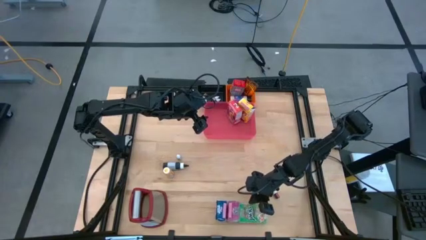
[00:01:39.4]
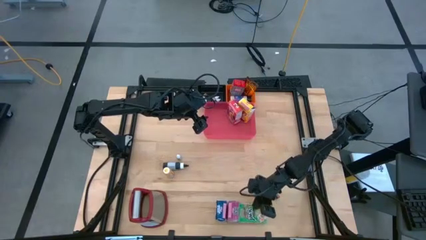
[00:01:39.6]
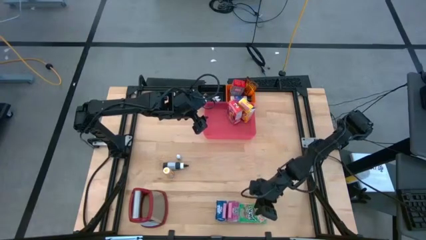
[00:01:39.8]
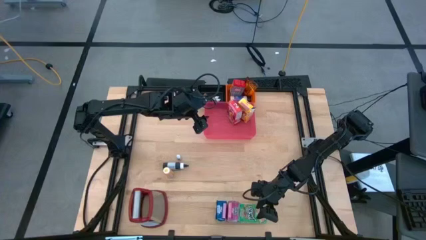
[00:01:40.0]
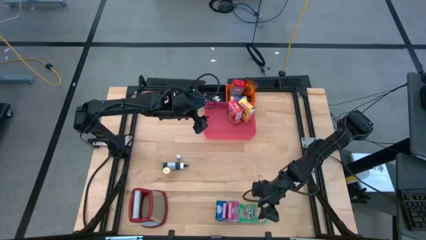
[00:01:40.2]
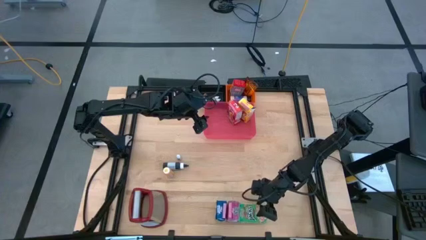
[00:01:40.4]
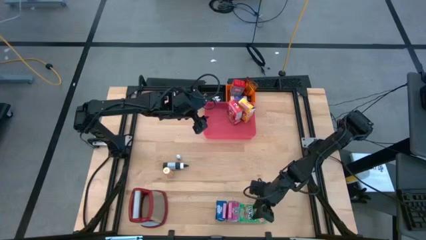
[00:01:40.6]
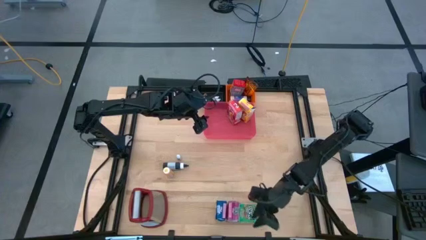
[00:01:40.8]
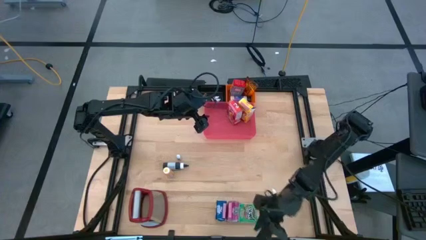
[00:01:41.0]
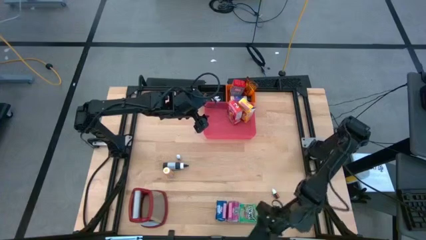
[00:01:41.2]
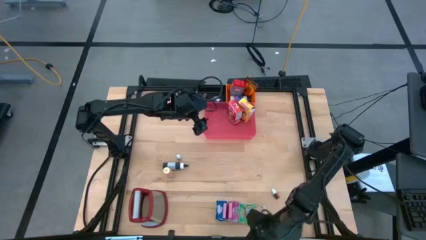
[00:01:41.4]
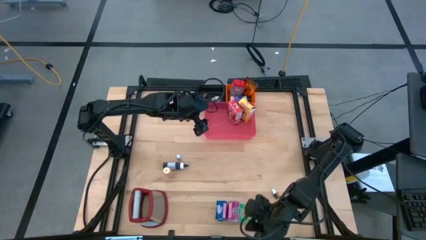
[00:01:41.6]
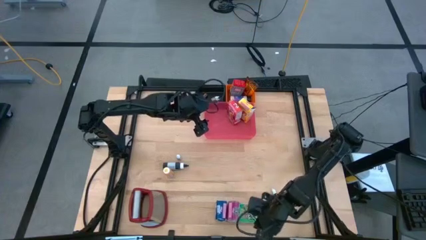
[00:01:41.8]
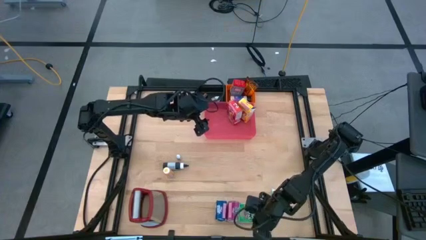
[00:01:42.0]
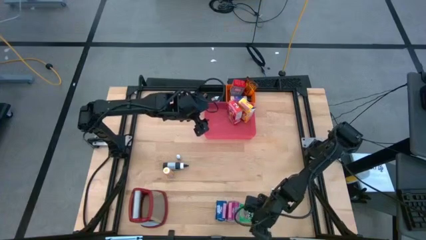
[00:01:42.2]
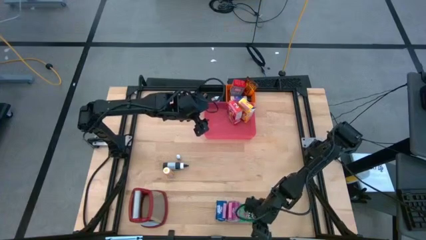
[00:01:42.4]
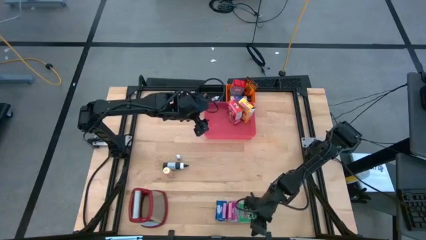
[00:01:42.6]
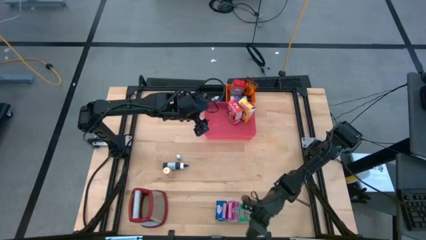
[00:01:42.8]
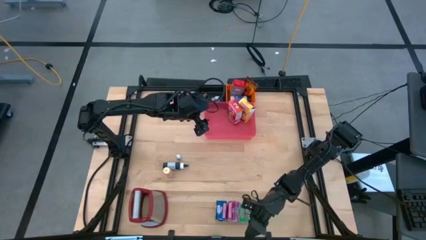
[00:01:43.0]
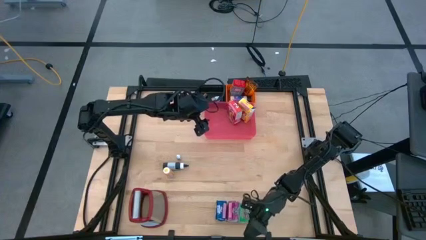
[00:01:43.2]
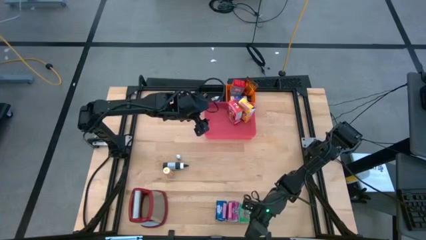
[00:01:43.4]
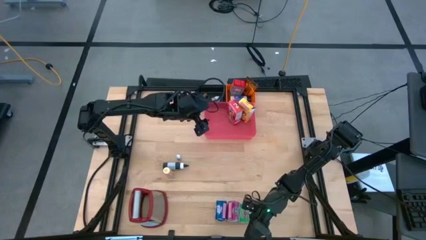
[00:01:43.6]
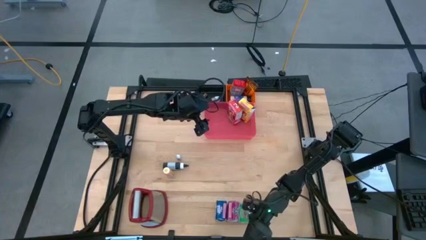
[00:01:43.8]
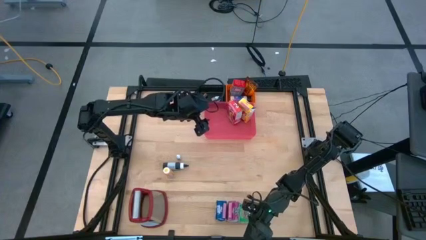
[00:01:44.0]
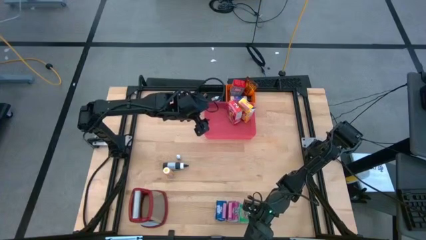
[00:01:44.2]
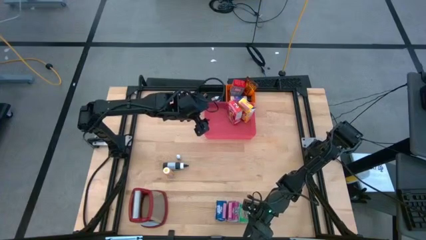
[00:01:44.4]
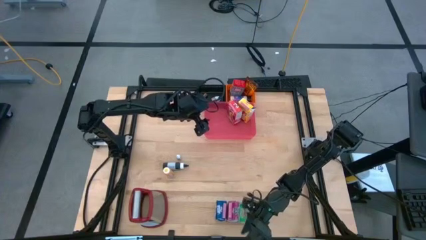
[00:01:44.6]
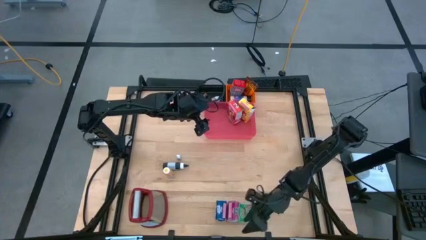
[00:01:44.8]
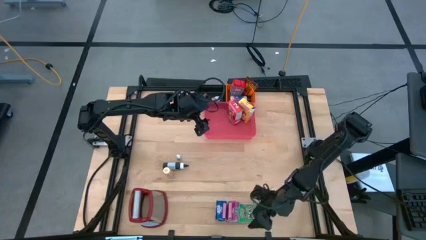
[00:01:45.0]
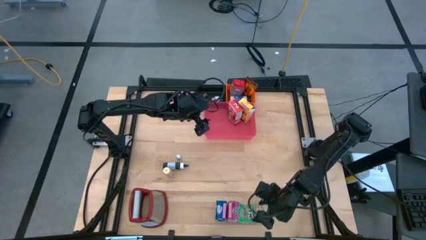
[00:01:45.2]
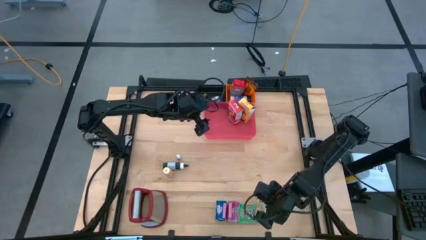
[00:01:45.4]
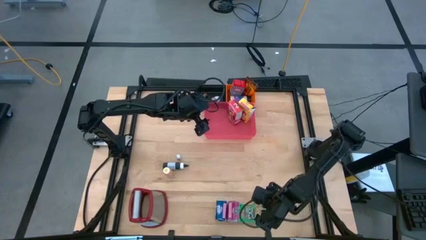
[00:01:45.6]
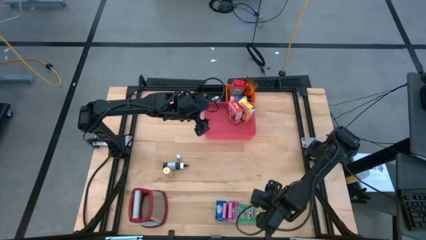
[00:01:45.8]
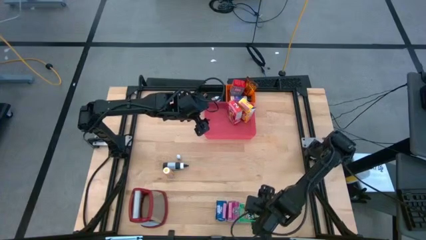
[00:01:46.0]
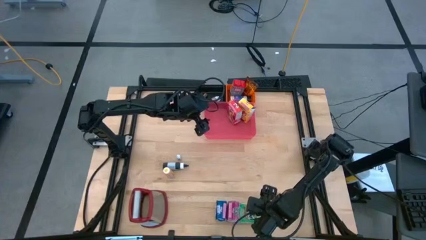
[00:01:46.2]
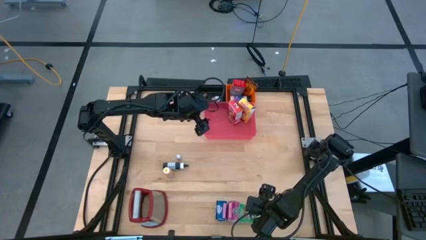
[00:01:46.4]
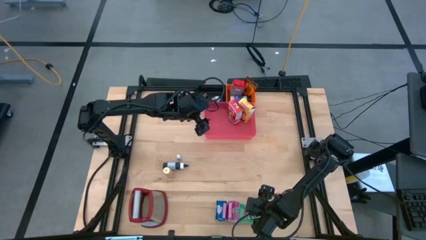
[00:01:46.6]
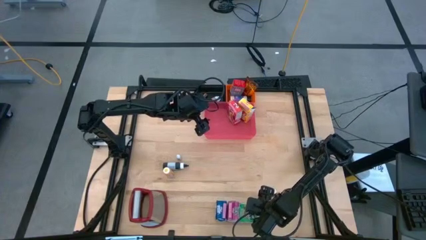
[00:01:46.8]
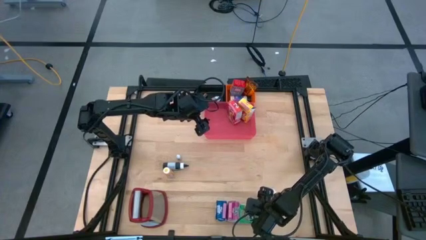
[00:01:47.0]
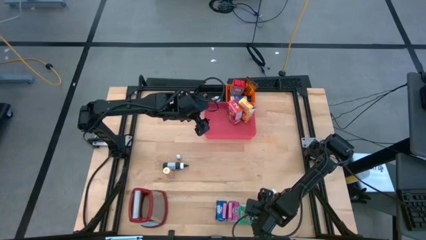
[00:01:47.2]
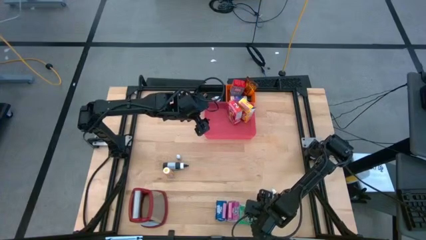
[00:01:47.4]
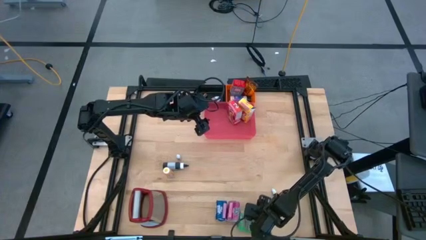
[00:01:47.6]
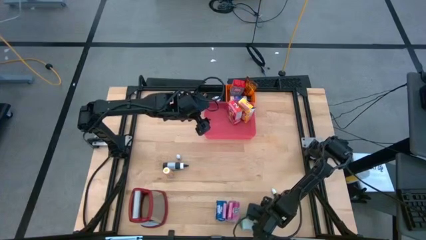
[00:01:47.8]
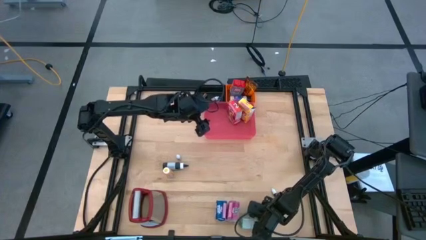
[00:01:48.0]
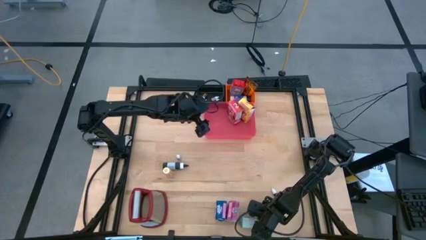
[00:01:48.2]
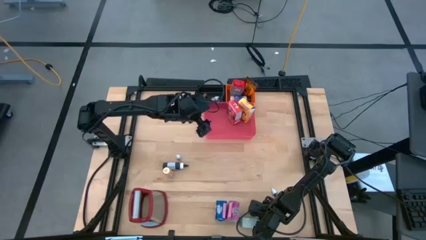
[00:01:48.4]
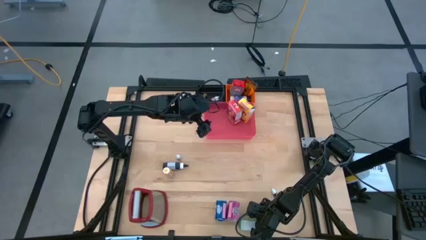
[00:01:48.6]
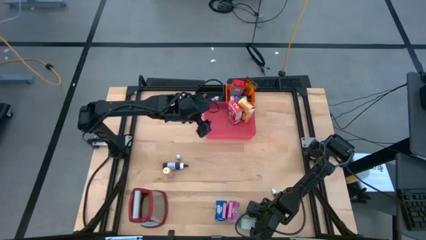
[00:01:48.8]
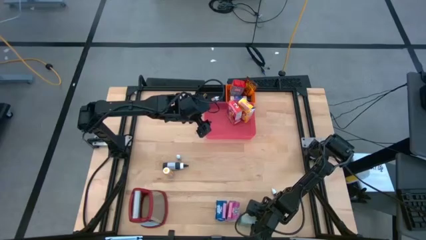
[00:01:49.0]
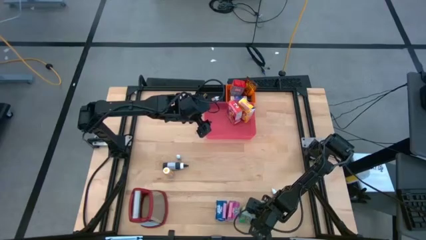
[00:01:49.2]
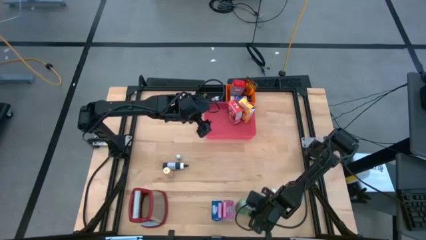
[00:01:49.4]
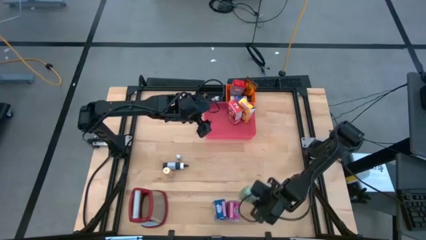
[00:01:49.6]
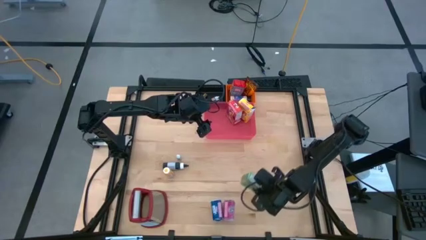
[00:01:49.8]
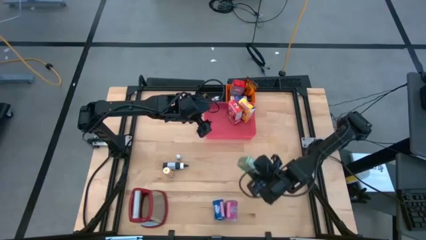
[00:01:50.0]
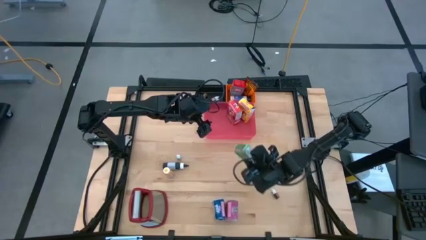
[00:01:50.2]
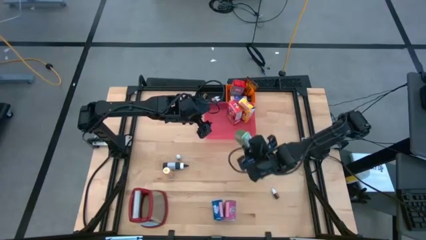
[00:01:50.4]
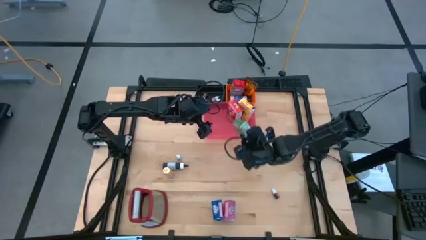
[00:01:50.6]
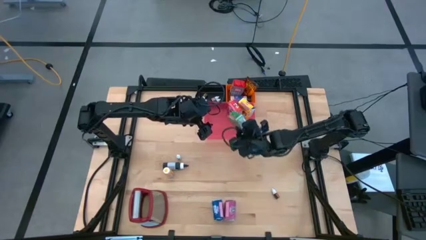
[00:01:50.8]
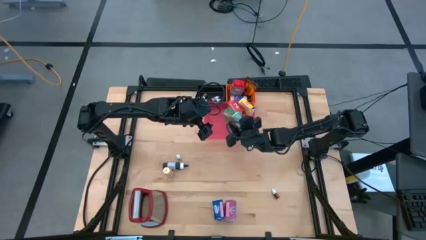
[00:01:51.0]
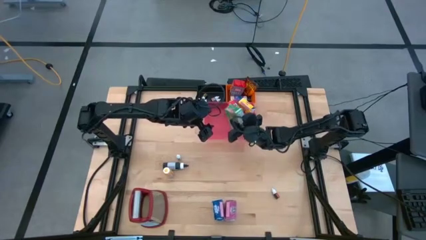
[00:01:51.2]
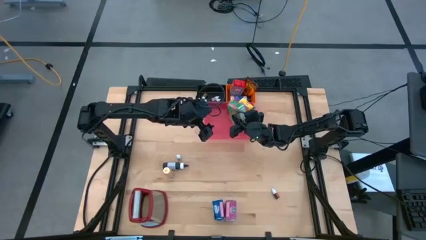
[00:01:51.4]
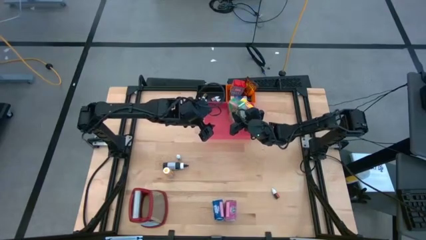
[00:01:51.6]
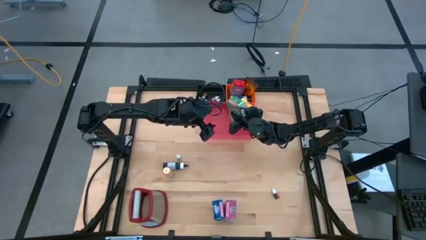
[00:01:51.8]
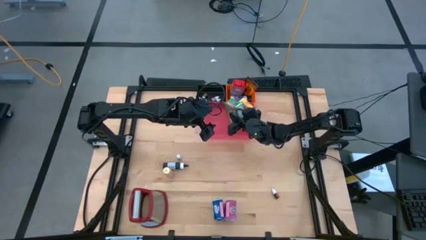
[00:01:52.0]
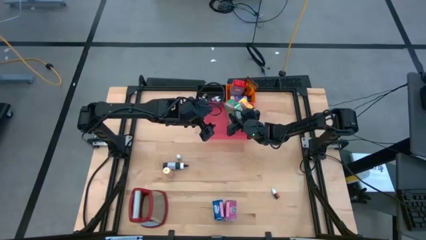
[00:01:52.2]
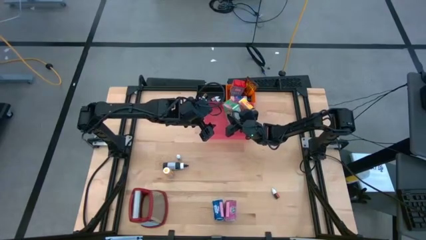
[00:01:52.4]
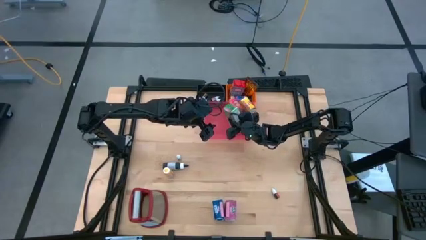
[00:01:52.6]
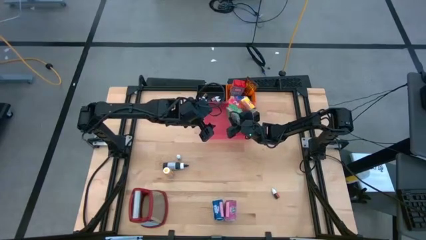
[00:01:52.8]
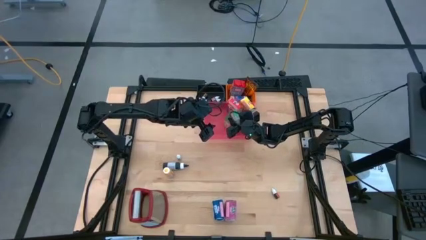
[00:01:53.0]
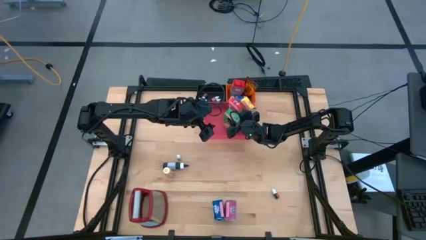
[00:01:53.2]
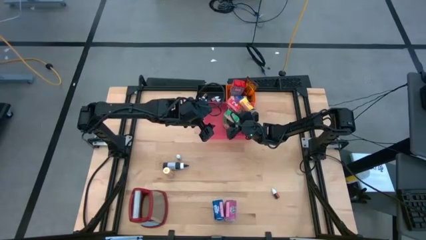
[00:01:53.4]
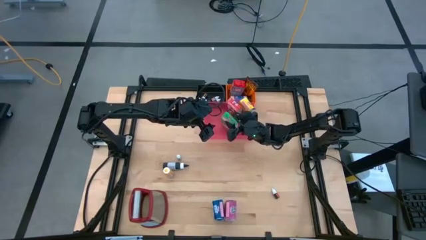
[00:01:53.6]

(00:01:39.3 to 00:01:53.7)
Task: Pick & Place Kitchen Items
Put the green cereal box into the pink bin
